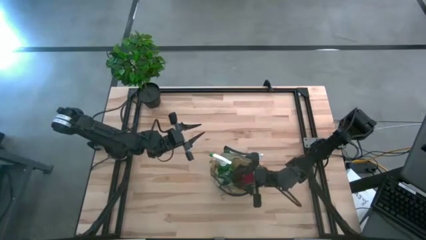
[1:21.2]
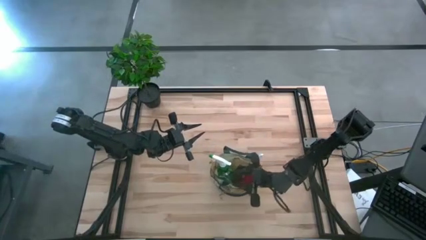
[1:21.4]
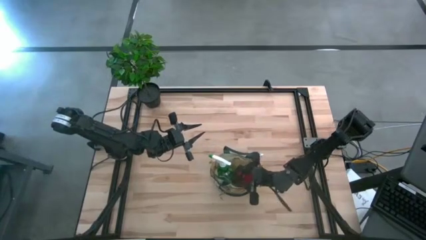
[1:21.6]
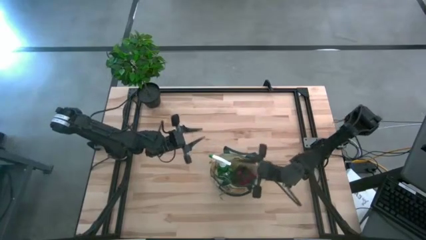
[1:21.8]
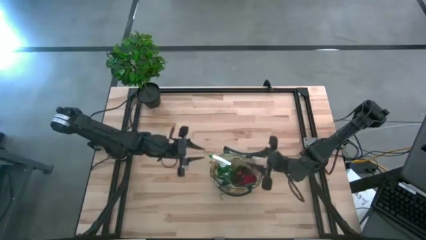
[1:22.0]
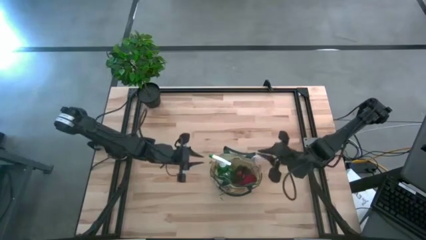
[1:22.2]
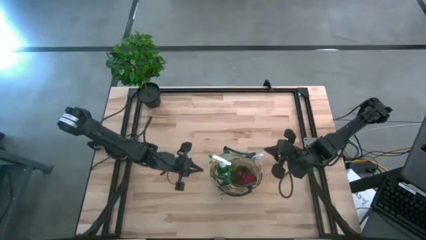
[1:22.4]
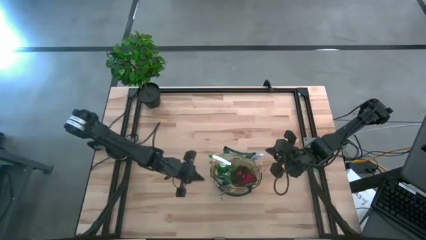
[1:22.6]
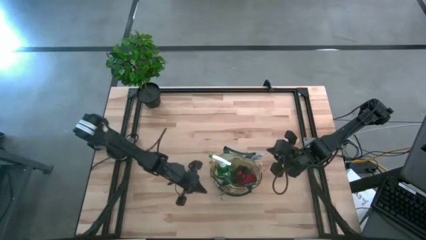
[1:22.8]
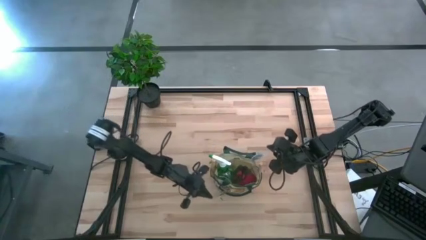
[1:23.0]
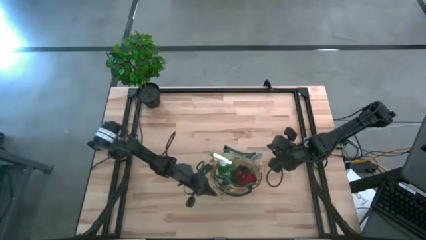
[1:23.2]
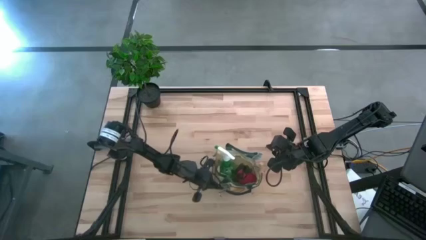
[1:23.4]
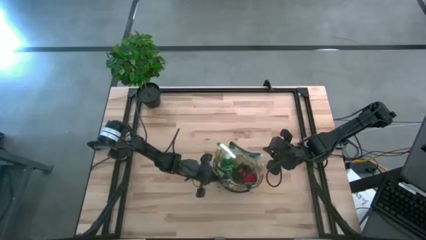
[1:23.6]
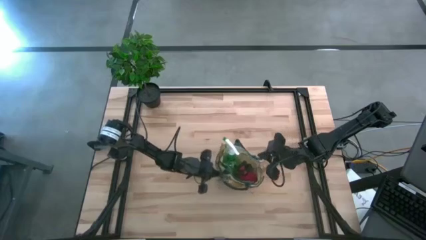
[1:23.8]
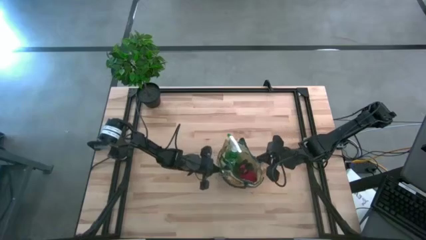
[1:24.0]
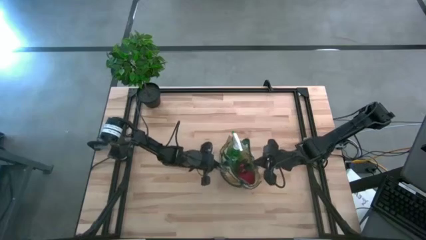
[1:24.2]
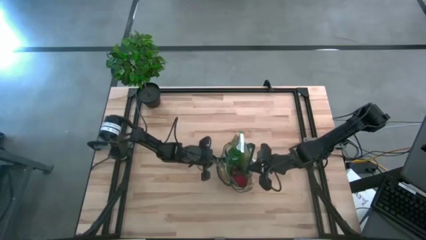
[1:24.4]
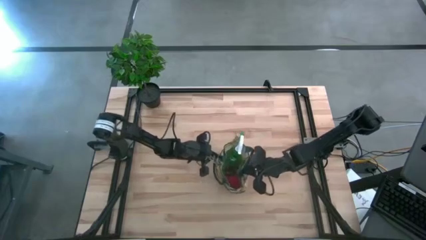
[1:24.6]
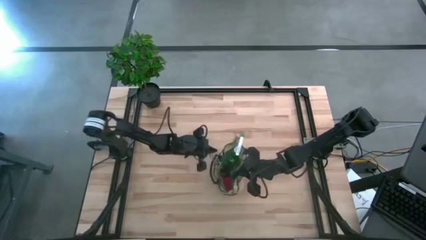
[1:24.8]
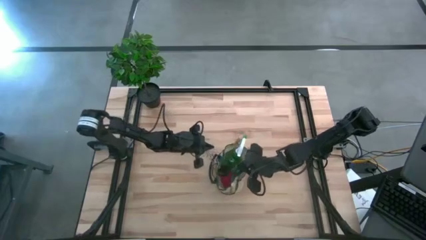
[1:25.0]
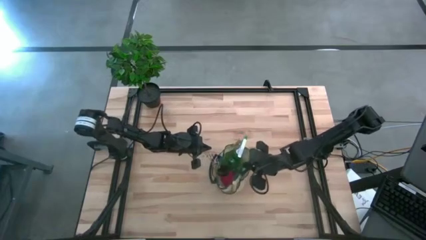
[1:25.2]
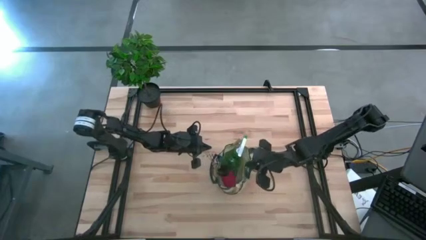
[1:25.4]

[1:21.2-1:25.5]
Task: Pick & Place Garden tools in Gardening bag
Adjust the gardening bag

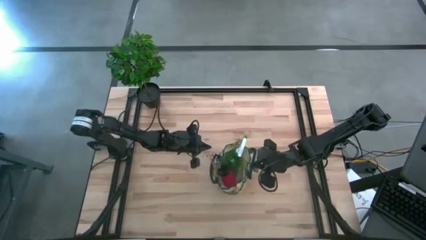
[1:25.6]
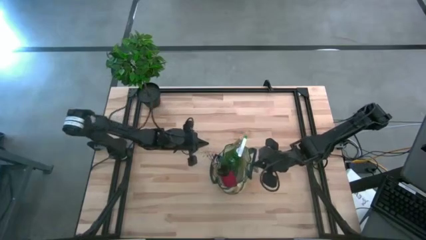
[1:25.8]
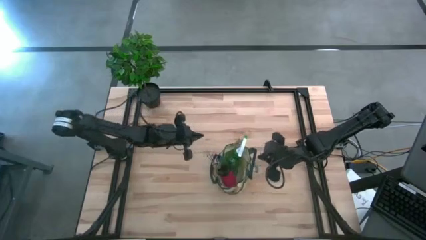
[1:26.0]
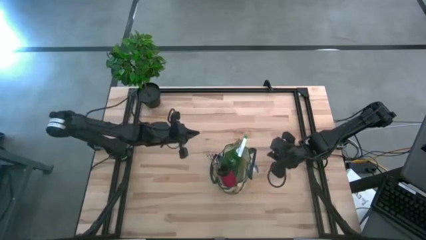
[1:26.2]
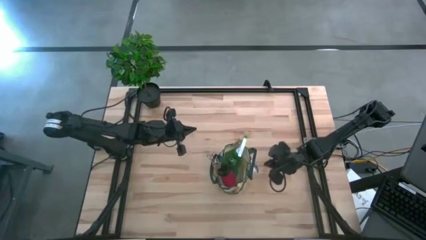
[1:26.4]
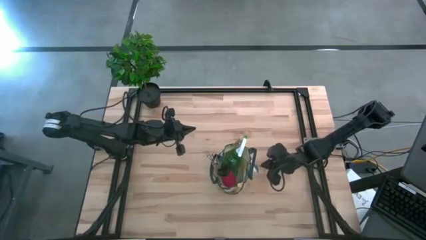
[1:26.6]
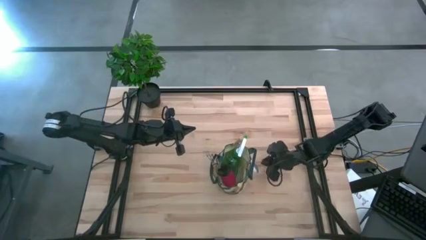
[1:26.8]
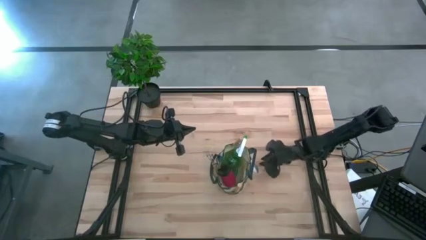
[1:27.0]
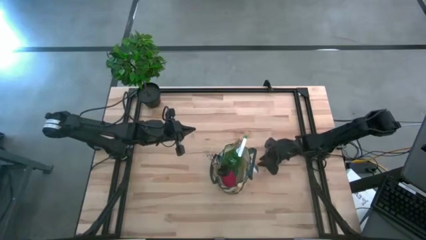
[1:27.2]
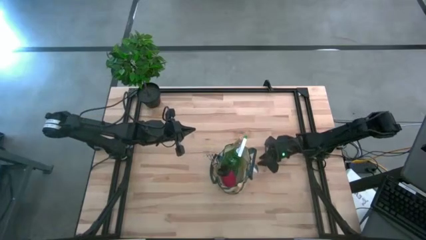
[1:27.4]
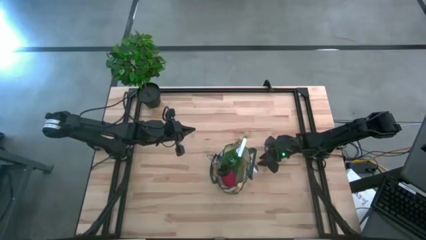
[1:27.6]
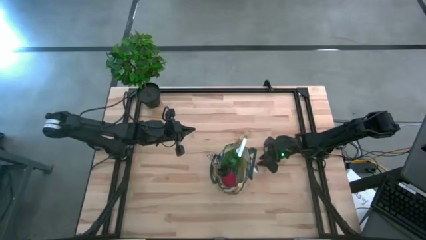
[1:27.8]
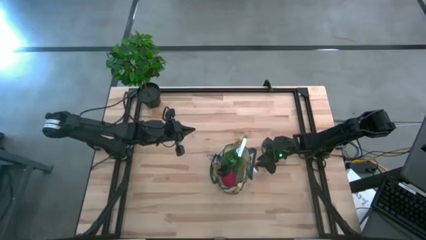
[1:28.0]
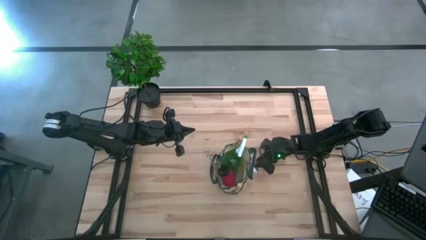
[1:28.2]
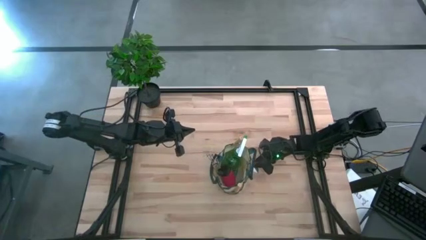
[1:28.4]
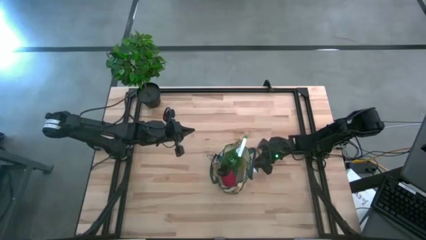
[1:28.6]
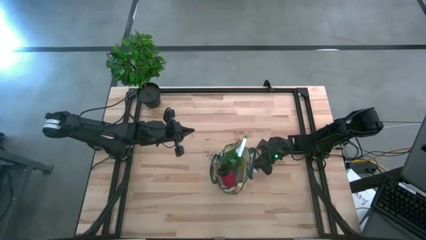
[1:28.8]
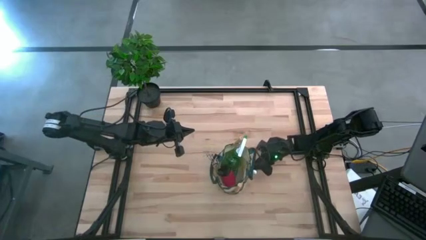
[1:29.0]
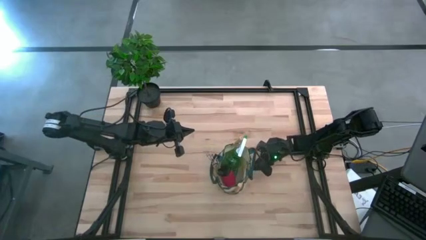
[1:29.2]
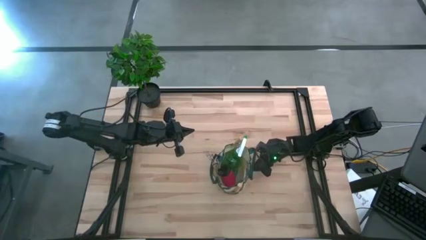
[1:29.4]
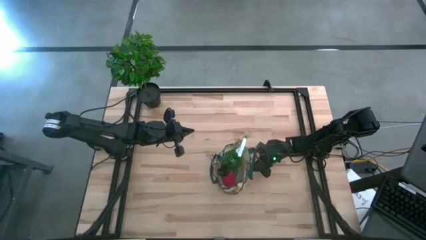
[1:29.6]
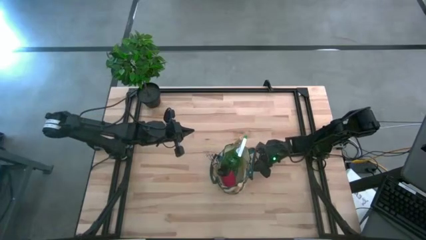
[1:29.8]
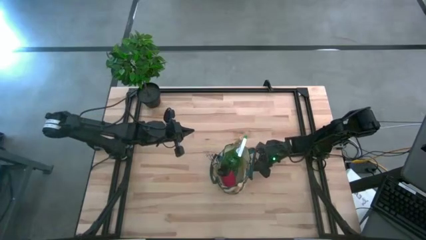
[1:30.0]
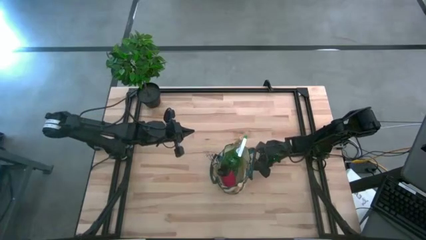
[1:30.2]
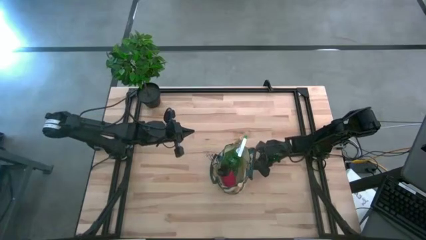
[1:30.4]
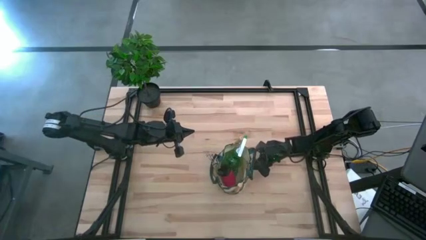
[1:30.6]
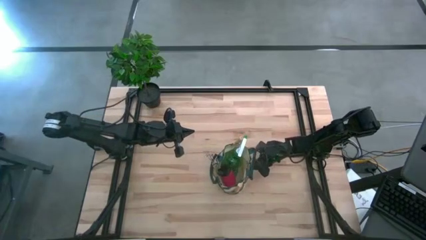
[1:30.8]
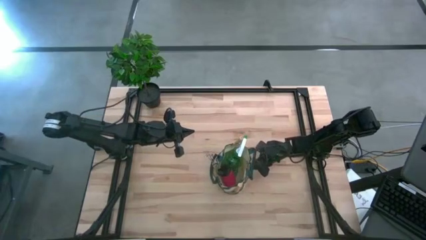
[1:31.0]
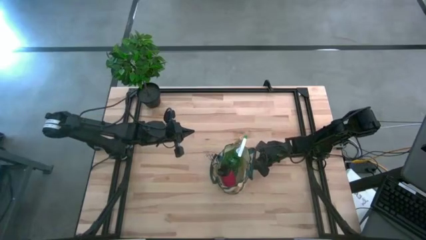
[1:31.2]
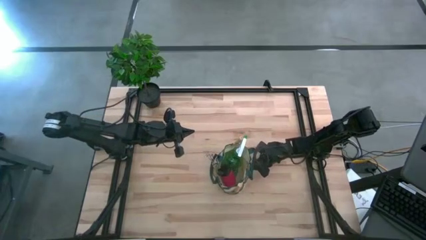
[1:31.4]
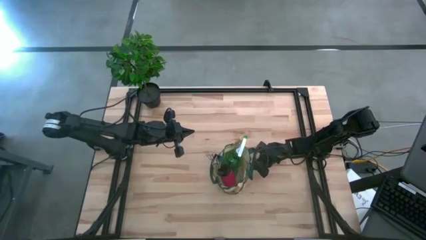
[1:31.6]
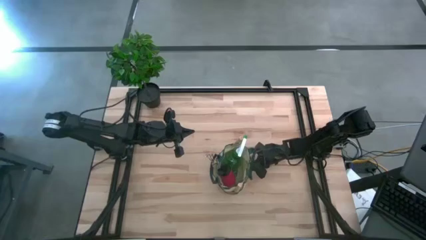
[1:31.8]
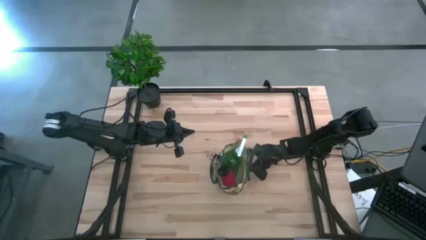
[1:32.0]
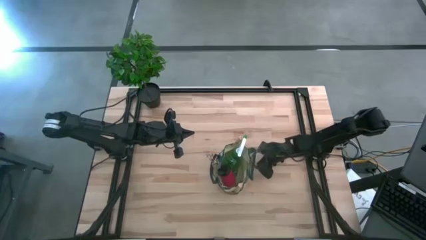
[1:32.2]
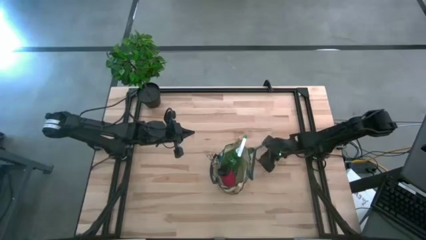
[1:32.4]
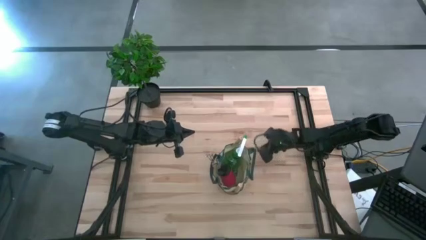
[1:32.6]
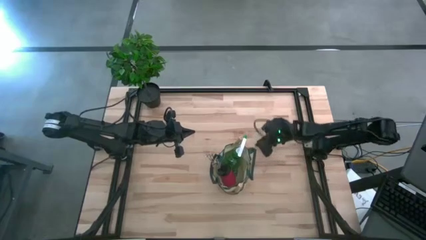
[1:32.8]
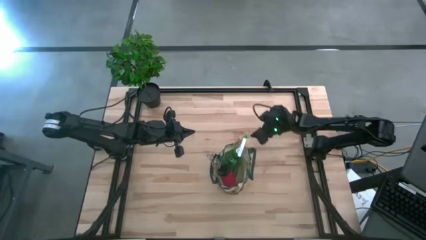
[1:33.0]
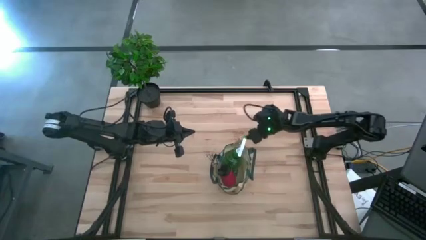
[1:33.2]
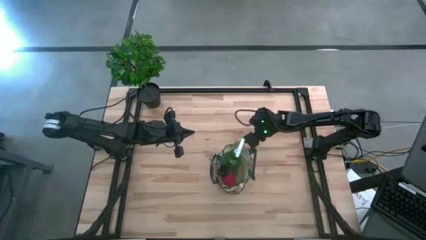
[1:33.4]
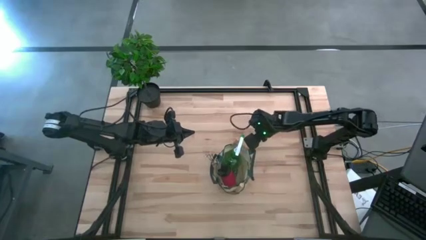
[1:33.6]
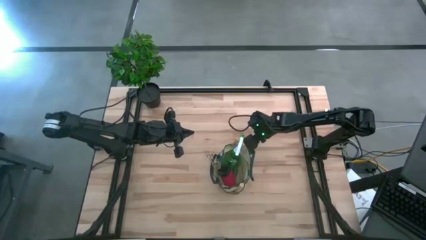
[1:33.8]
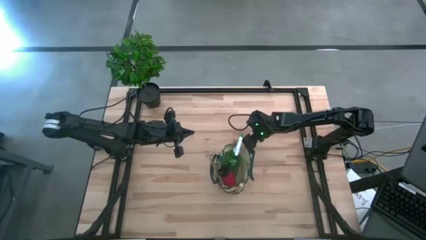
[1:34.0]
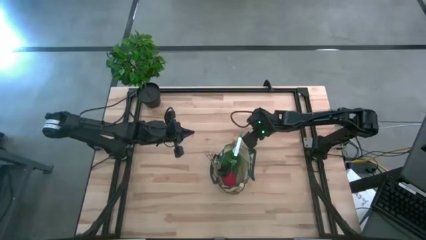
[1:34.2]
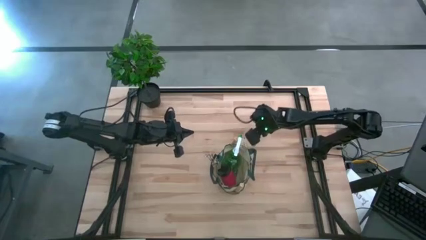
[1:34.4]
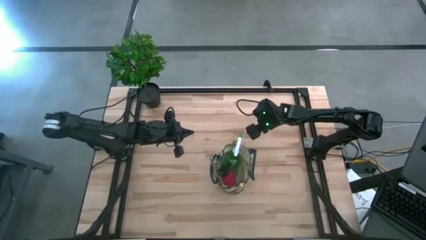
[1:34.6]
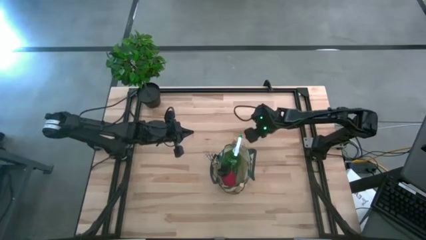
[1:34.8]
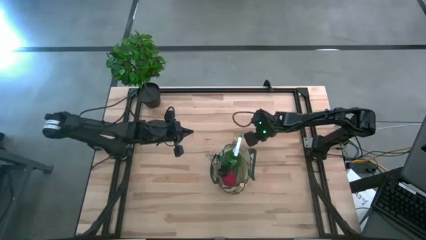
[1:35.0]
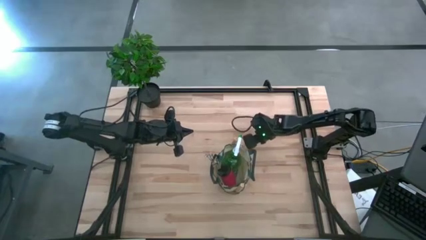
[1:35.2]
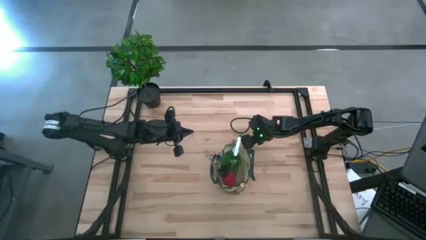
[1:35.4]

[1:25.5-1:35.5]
Put the trowel into the gardening bag
